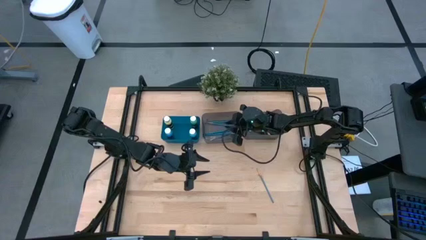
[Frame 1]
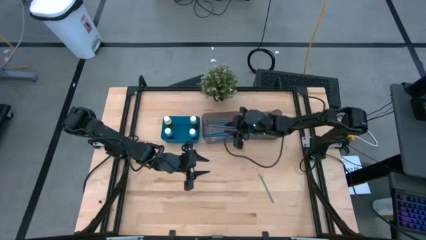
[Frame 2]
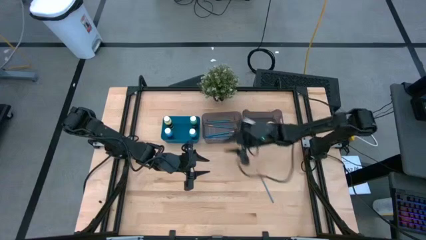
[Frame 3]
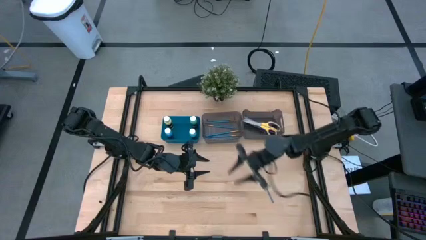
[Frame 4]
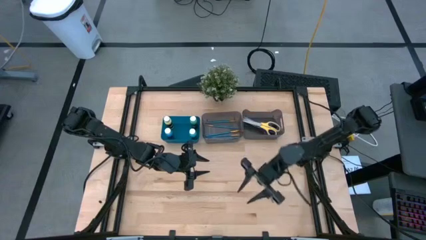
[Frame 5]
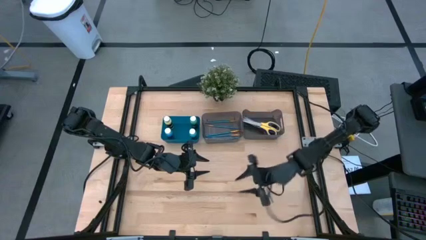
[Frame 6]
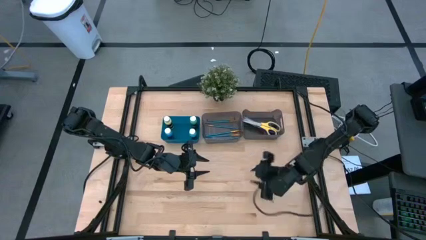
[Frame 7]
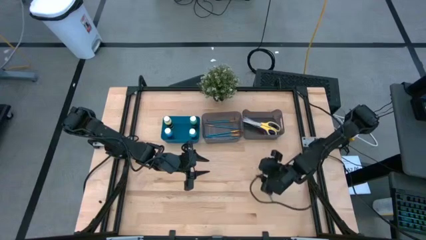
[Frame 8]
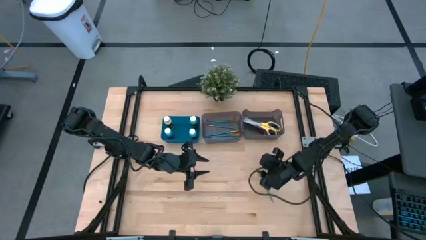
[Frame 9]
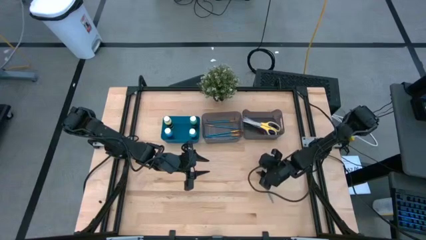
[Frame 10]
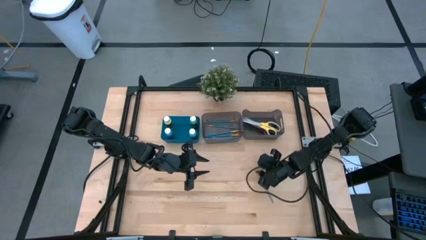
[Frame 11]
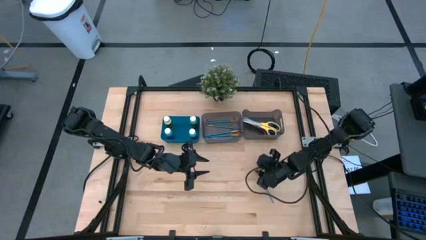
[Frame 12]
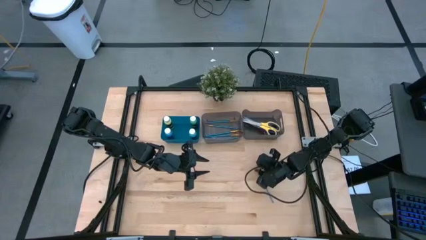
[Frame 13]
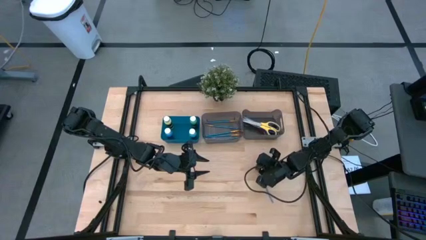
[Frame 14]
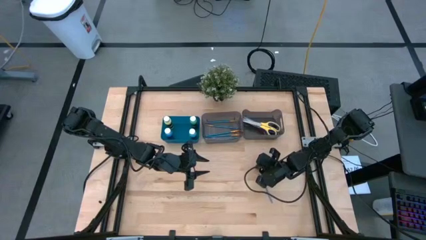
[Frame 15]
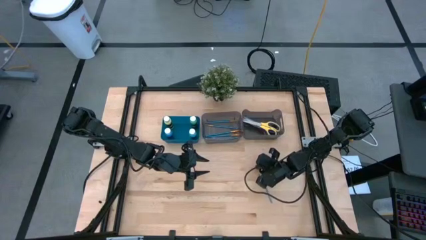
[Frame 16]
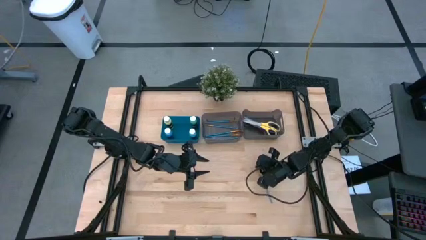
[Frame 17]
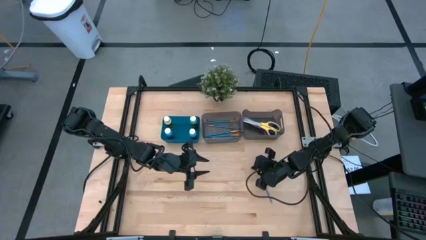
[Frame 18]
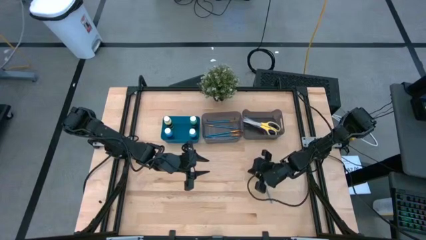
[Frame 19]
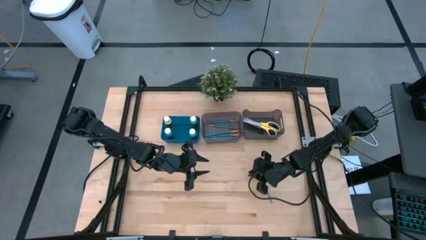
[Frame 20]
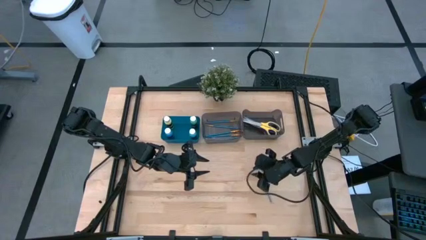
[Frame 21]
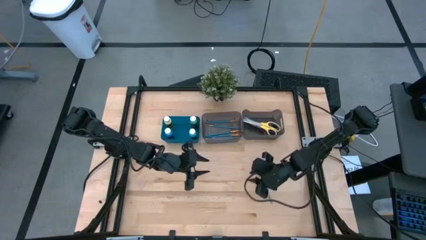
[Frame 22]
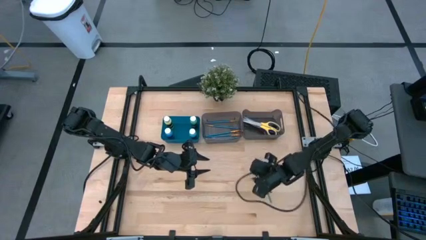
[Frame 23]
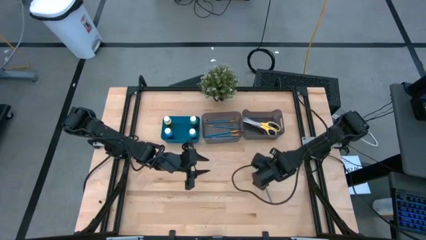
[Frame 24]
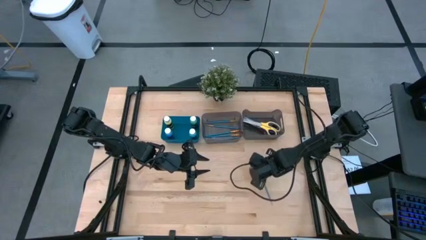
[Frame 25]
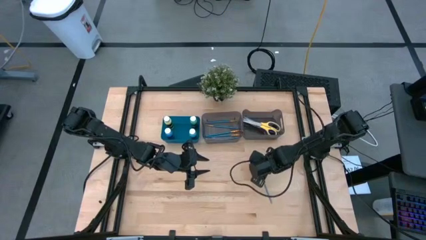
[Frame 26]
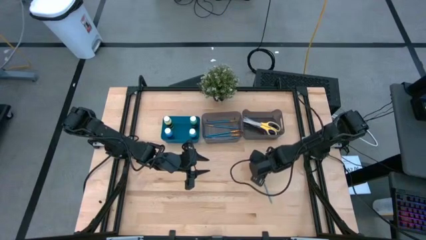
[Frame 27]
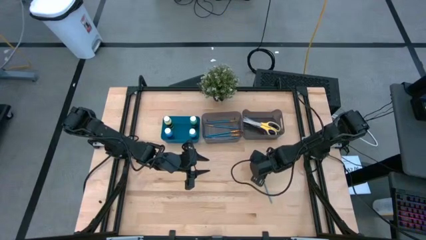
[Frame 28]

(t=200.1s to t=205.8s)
Task: Pick & Place Paint Supplies
Put the paint brush into the left black bin

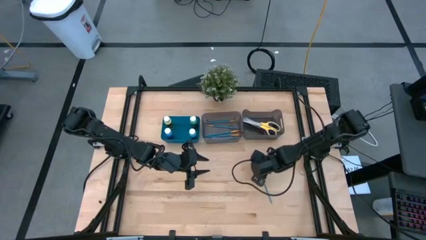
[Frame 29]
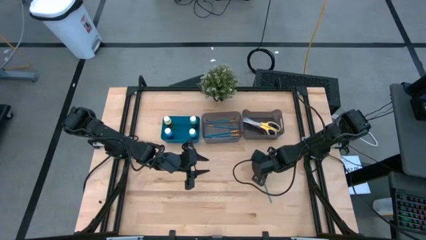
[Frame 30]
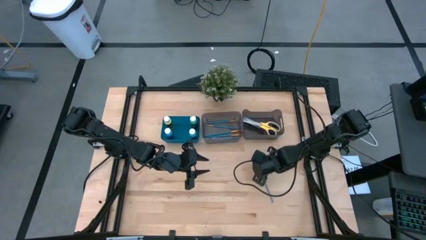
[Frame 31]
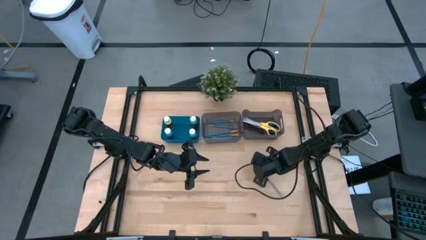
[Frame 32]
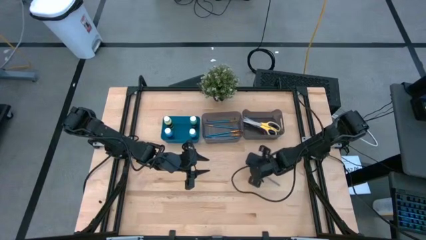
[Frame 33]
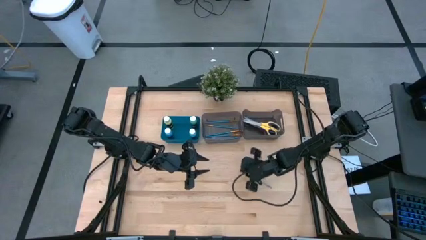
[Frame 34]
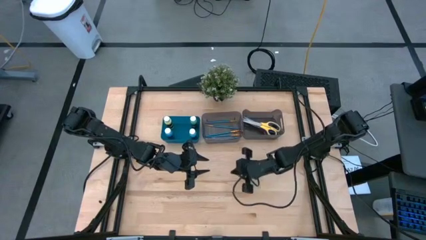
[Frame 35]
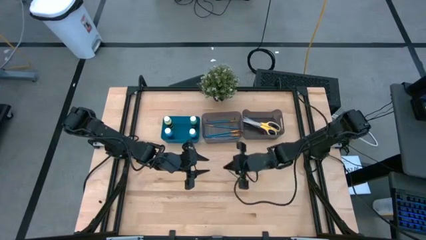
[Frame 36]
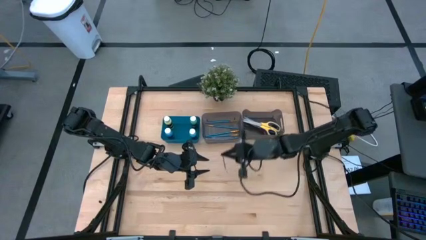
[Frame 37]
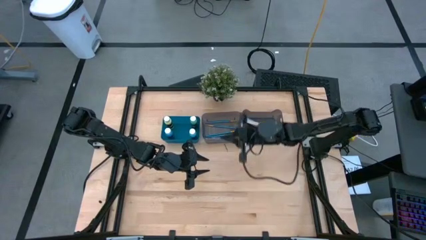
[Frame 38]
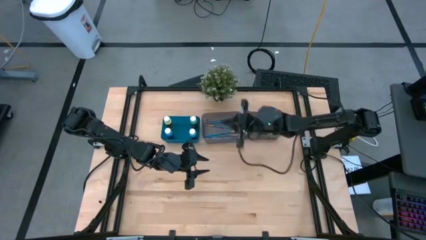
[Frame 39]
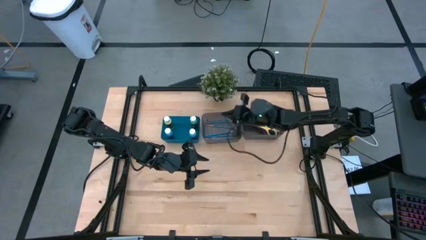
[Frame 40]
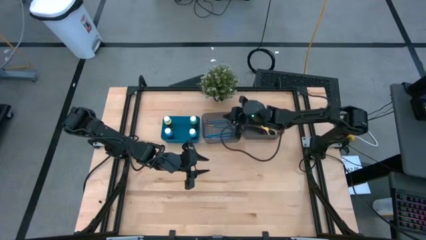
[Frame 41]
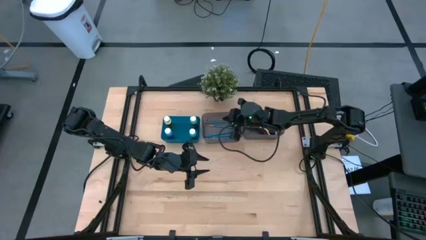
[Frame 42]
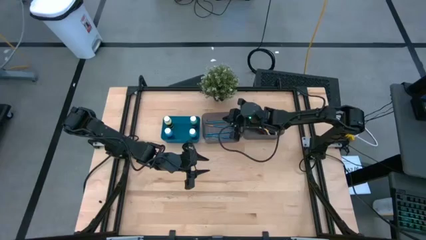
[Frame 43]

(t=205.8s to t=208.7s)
Put the paint brush into the left black bin

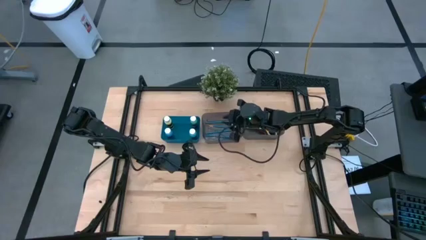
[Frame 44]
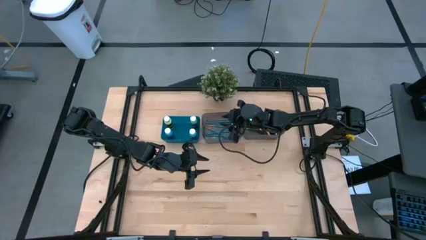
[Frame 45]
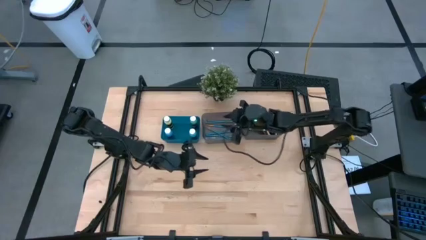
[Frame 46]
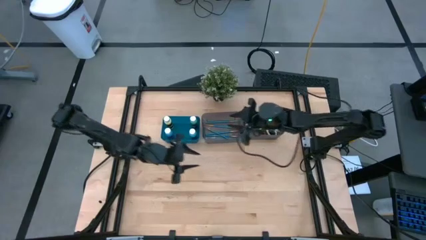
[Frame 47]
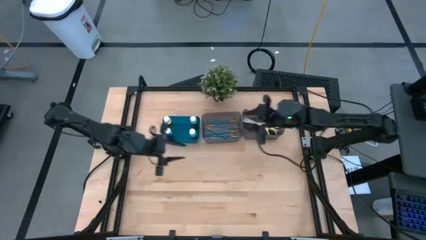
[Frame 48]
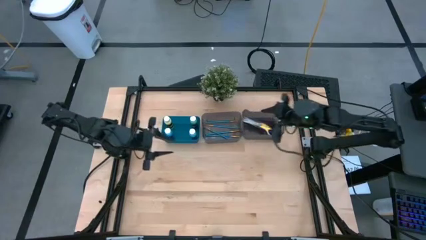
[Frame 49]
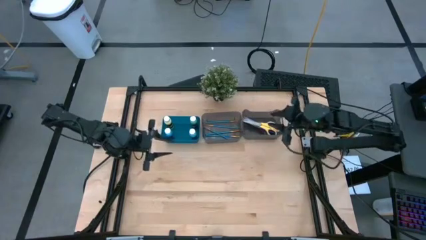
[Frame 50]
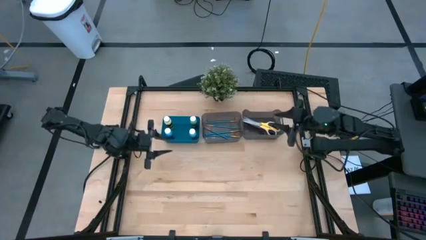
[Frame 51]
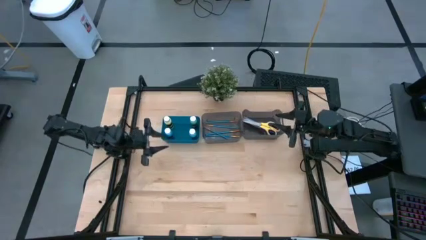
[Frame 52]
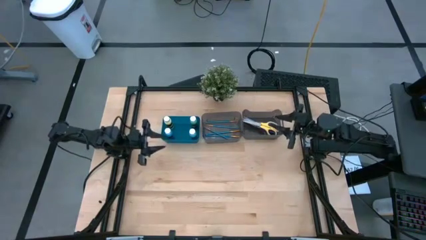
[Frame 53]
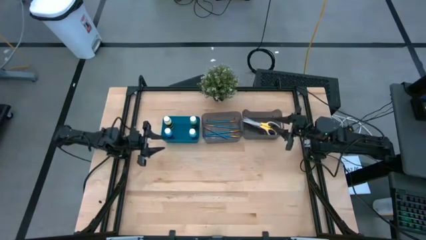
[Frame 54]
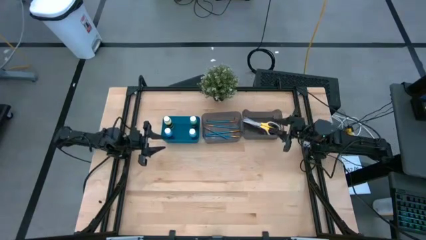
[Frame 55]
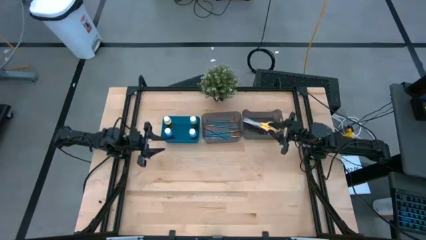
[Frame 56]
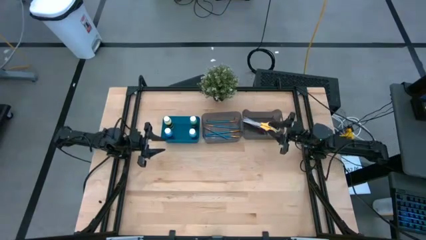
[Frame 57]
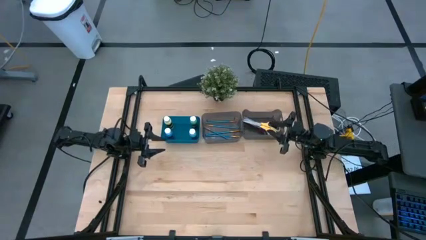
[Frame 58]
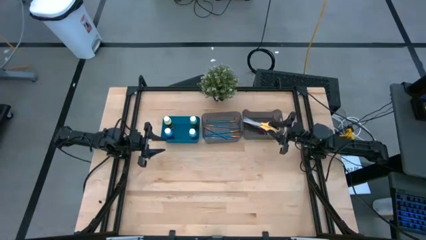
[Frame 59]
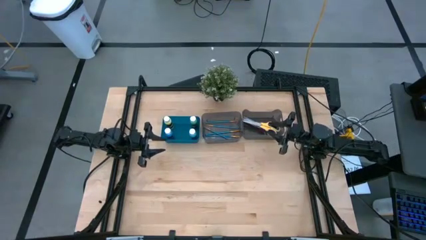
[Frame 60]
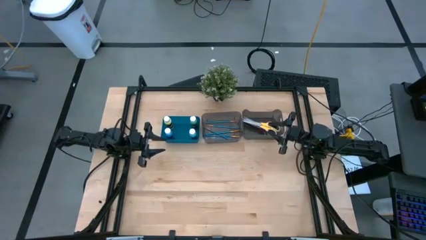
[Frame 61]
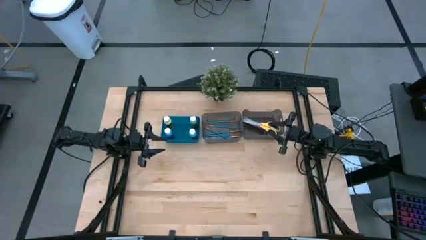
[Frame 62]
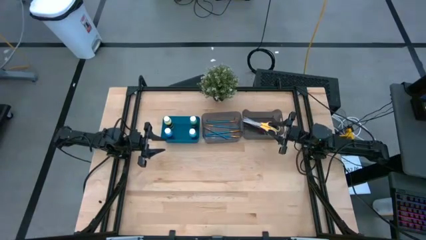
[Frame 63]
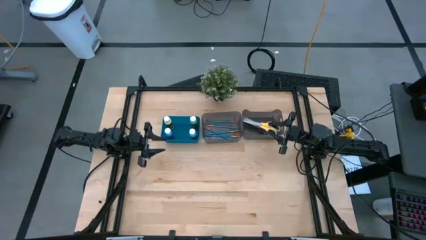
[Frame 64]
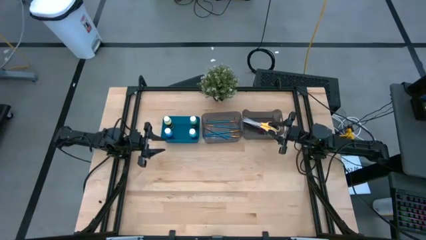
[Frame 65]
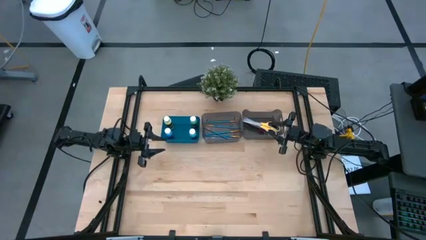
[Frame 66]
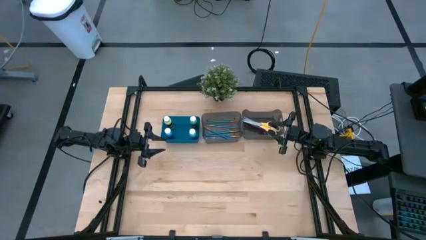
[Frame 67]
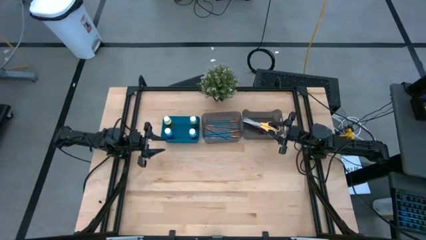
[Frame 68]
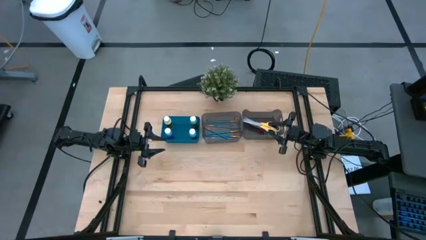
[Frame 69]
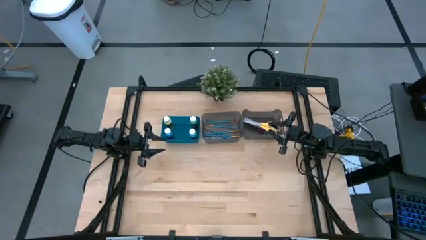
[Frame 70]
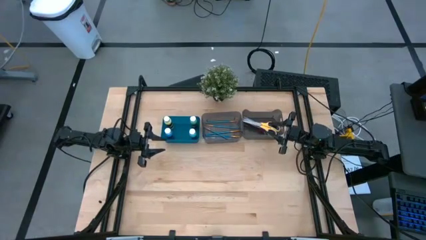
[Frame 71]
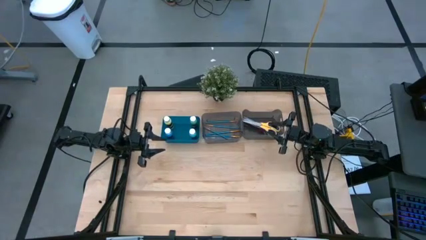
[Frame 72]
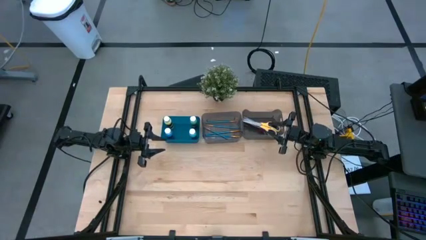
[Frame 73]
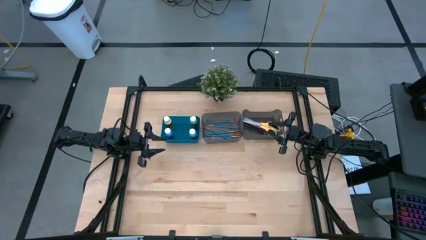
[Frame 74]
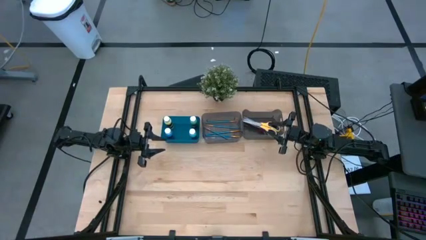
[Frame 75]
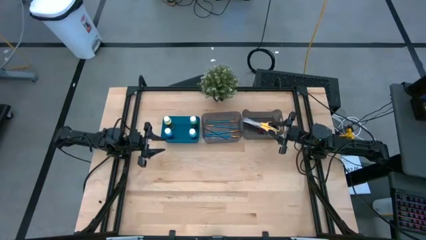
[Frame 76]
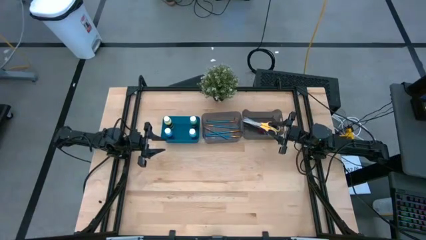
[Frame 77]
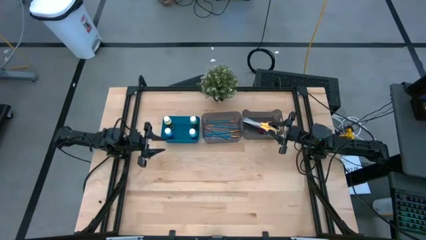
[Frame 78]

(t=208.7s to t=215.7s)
Return to Home Position
